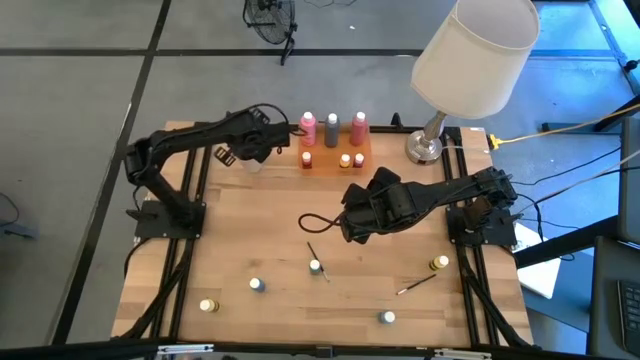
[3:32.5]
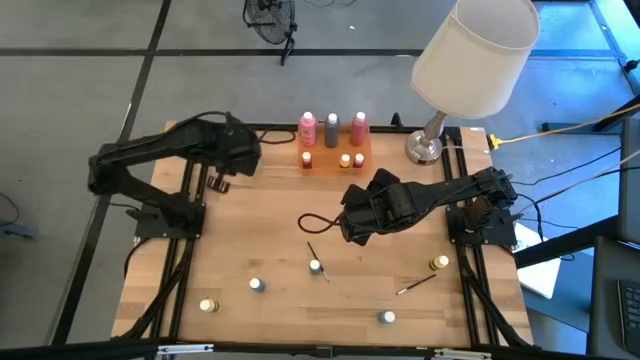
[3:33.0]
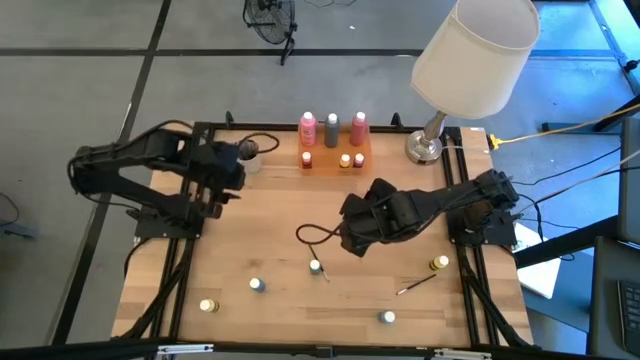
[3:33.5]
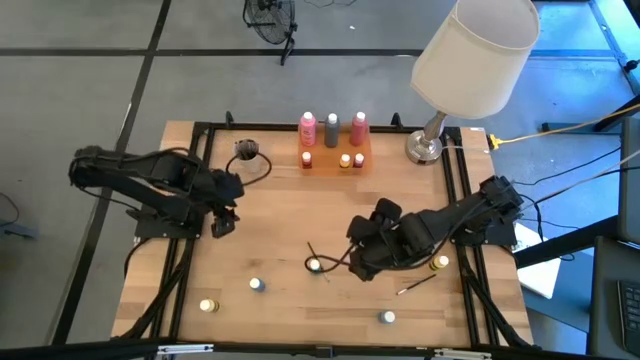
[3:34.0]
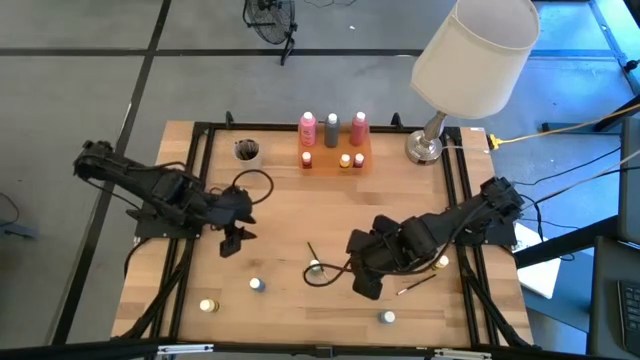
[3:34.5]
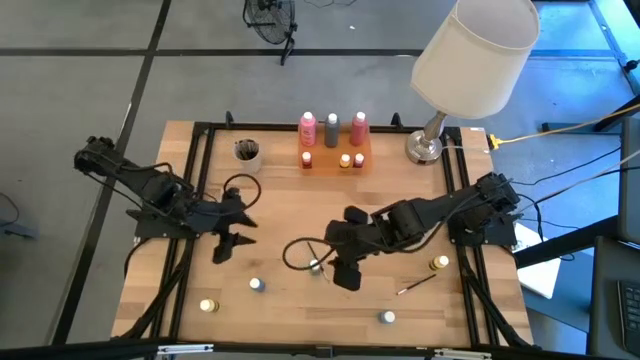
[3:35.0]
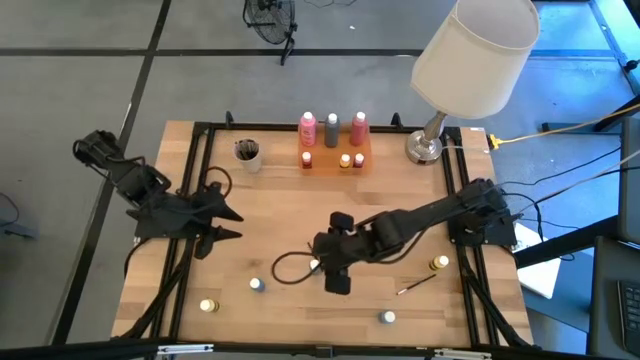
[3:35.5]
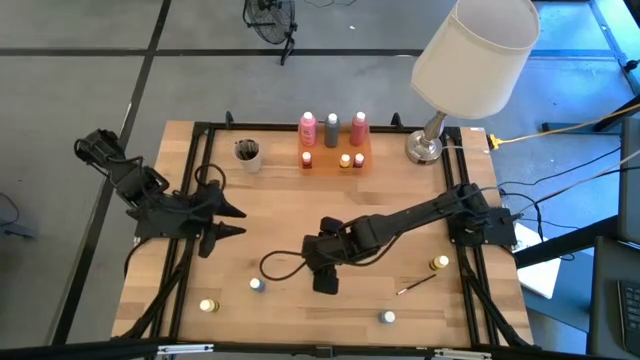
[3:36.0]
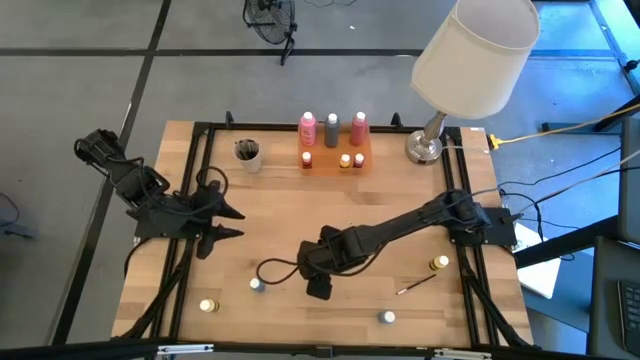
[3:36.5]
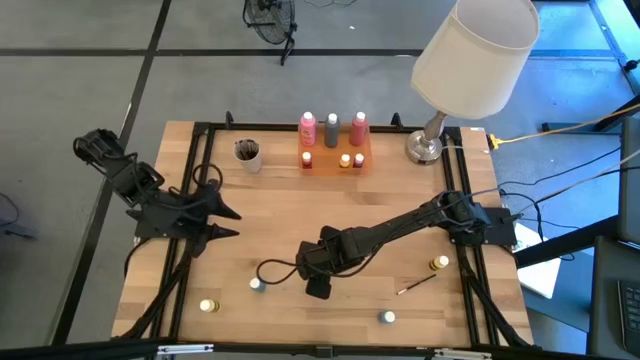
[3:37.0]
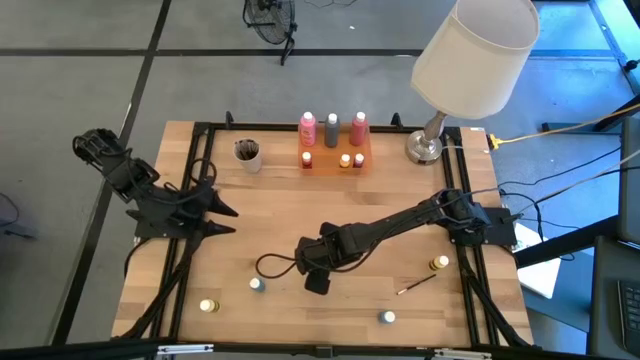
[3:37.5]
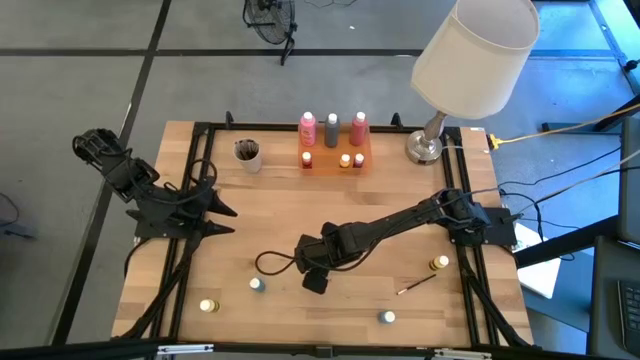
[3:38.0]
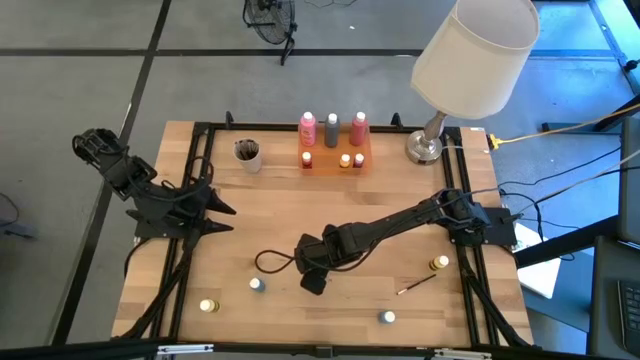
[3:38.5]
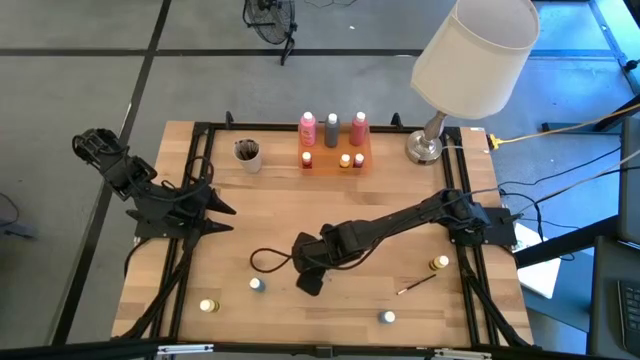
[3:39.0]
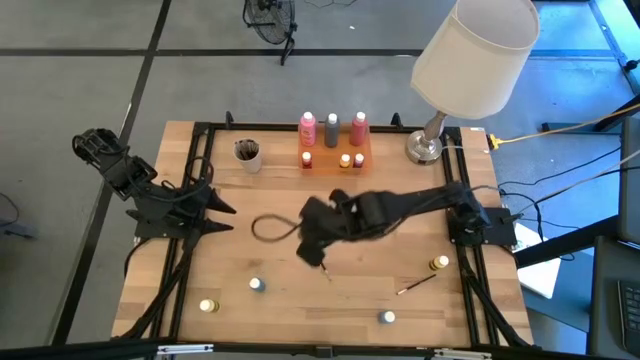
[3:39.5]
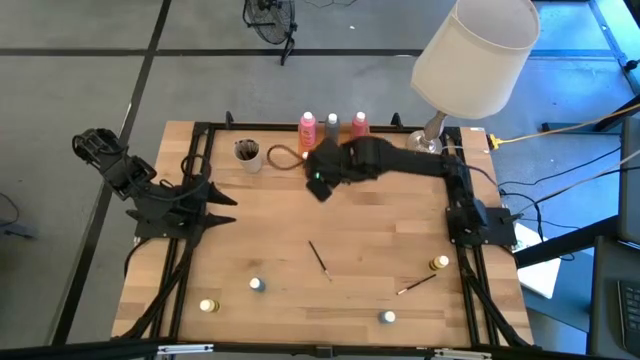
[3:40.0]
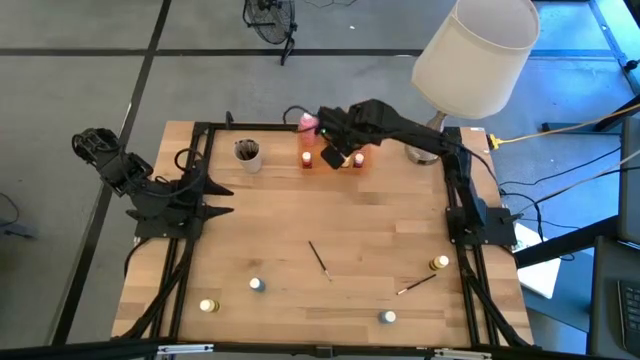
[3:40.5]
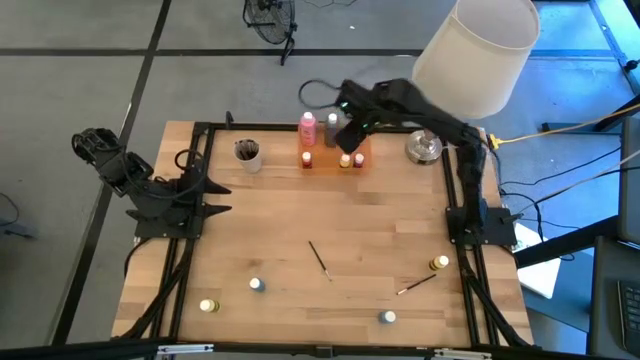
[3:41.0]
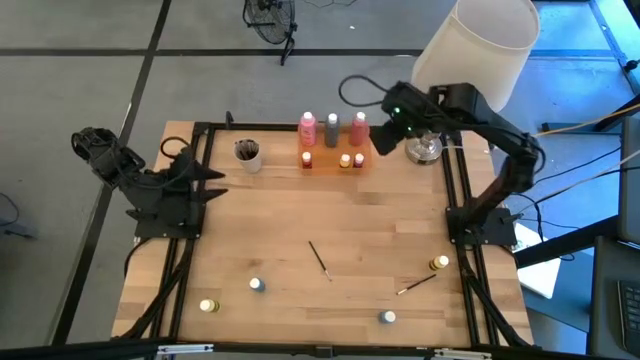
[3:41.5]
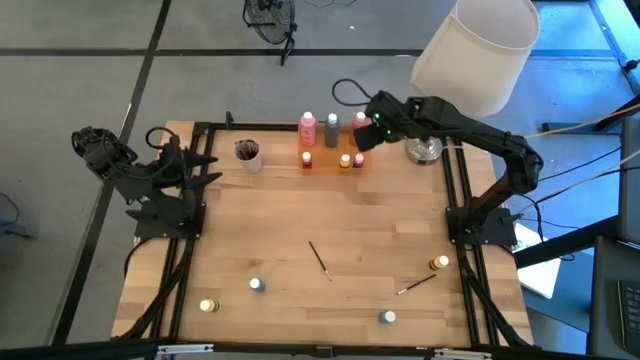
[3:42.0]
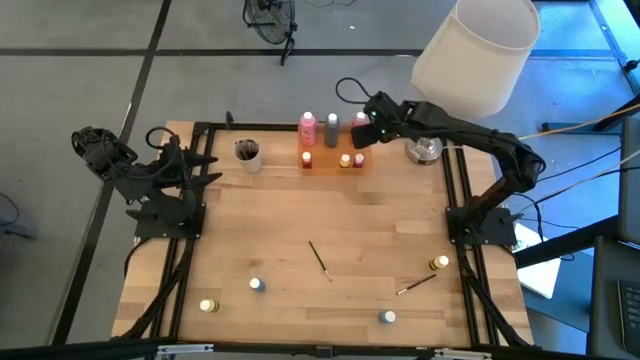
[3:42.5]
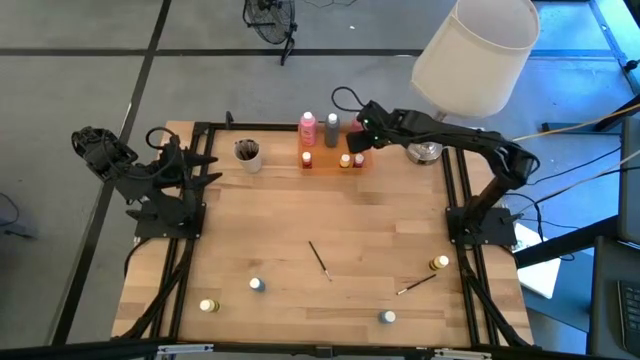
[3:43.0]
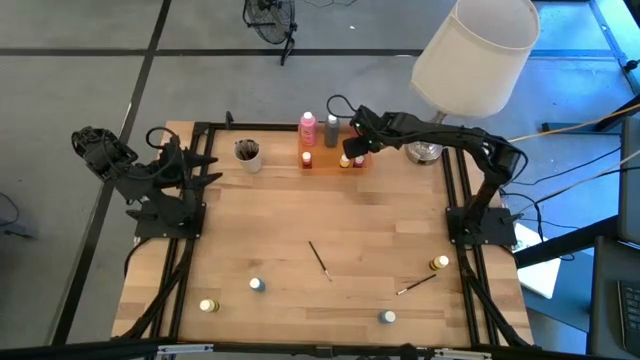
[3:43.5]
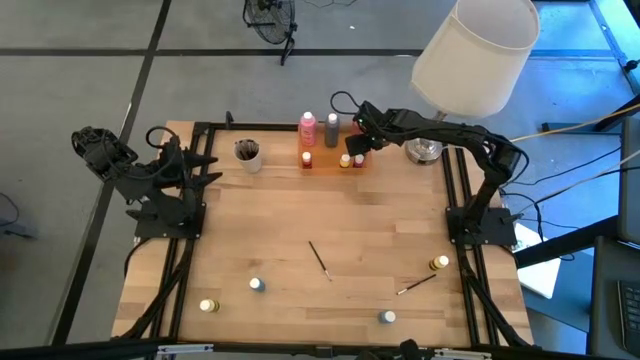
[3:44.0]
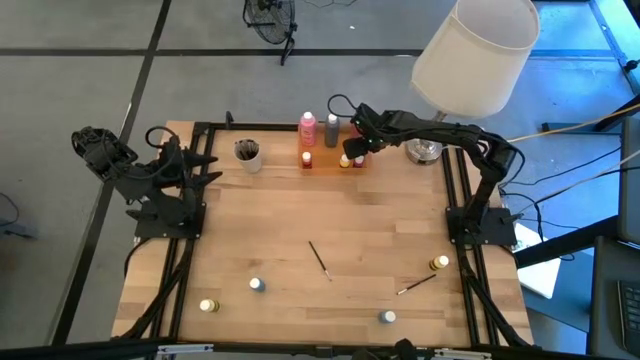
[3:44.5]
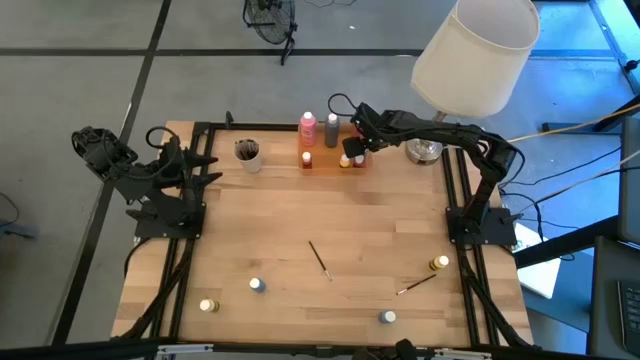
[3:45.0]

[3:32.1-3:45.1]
Task: Pick & Place Paint Supplies
Put the green paint bottle into the orange bin

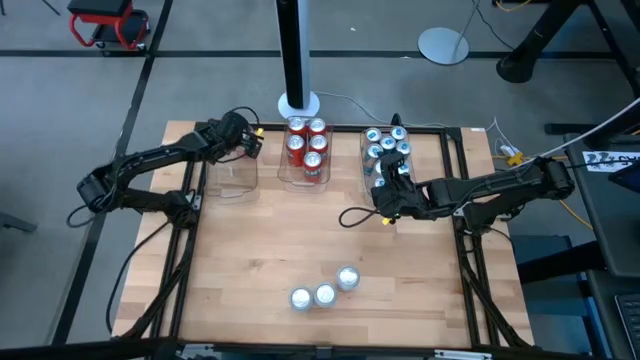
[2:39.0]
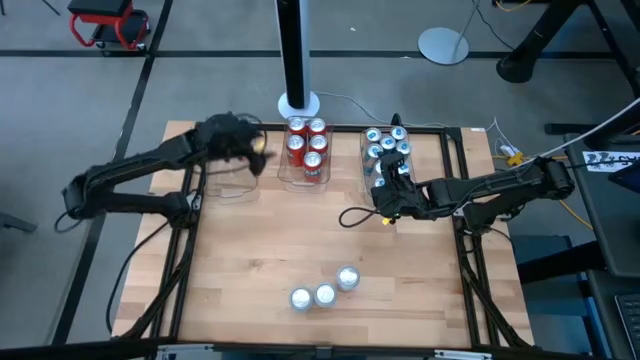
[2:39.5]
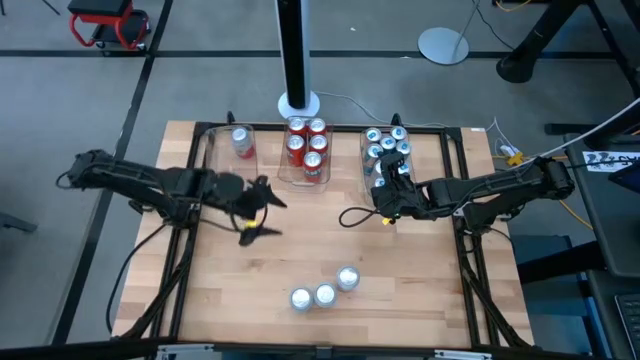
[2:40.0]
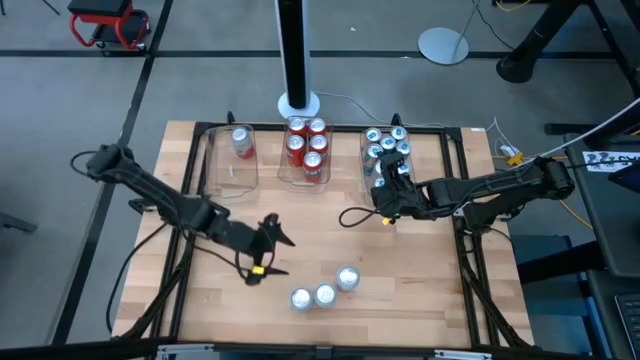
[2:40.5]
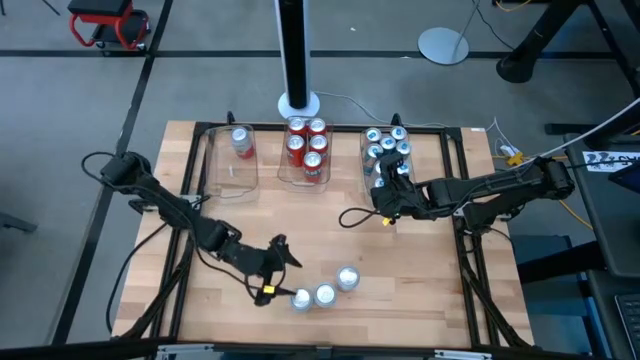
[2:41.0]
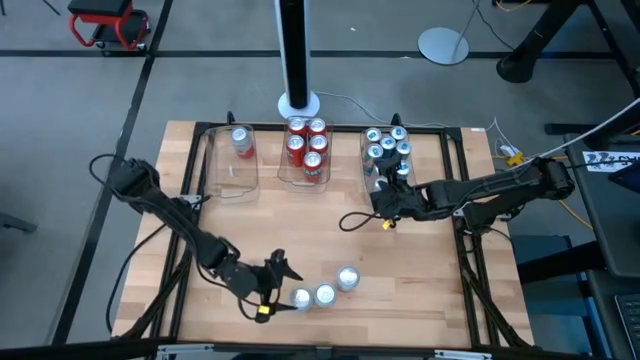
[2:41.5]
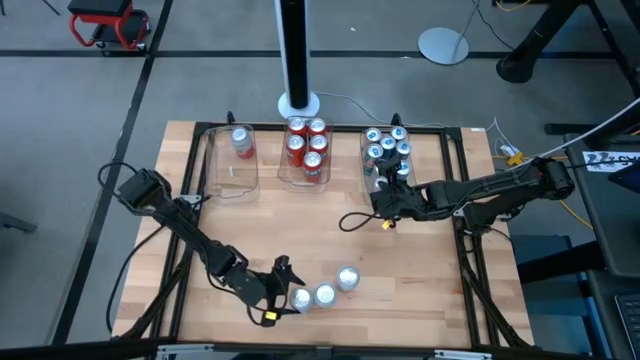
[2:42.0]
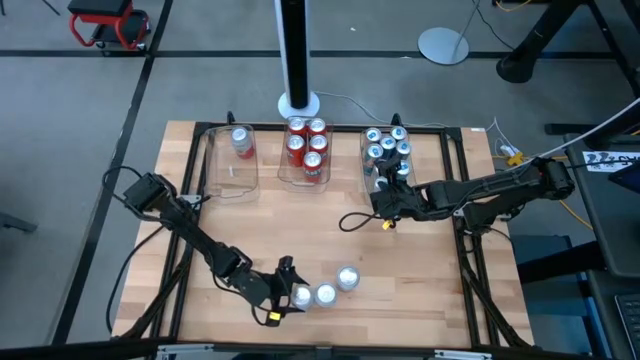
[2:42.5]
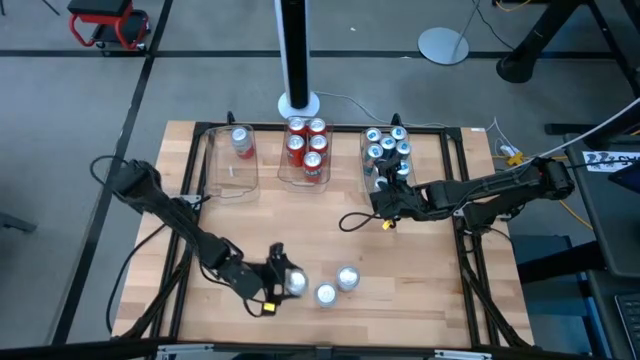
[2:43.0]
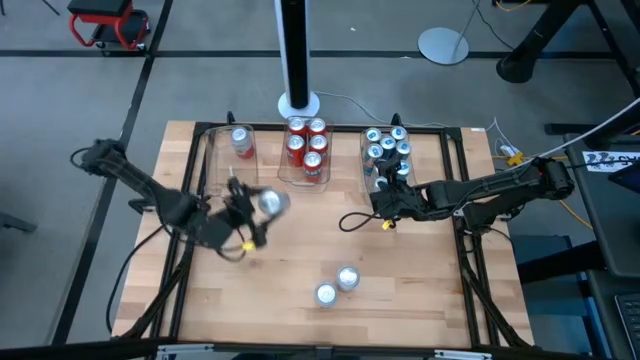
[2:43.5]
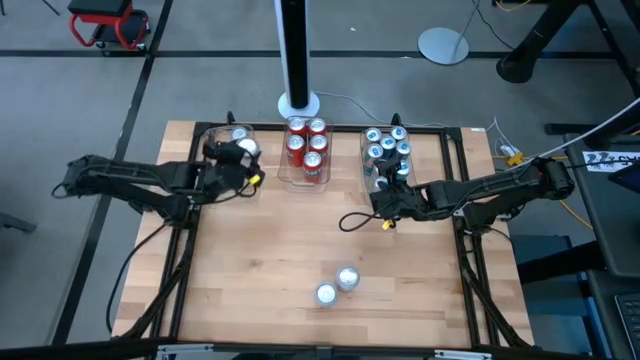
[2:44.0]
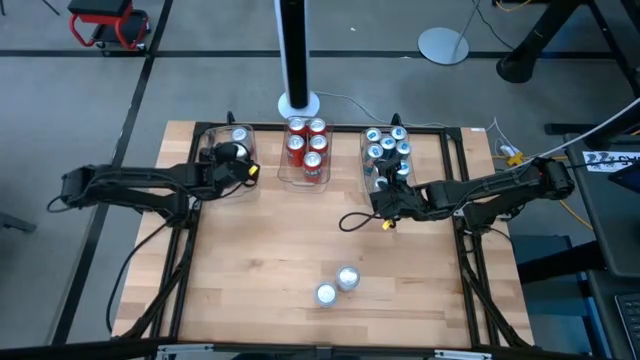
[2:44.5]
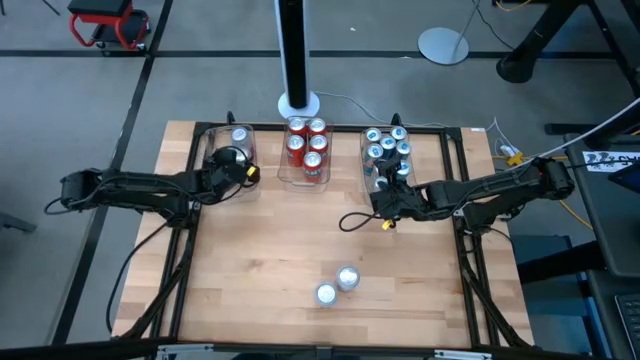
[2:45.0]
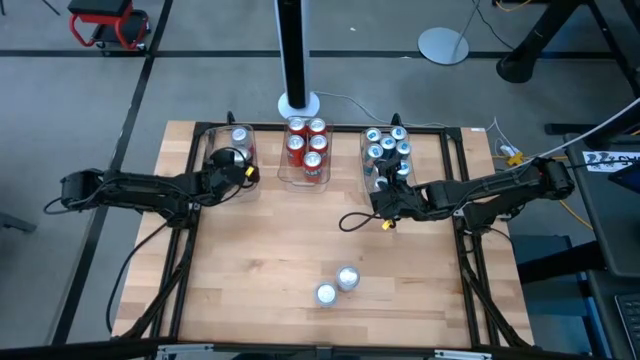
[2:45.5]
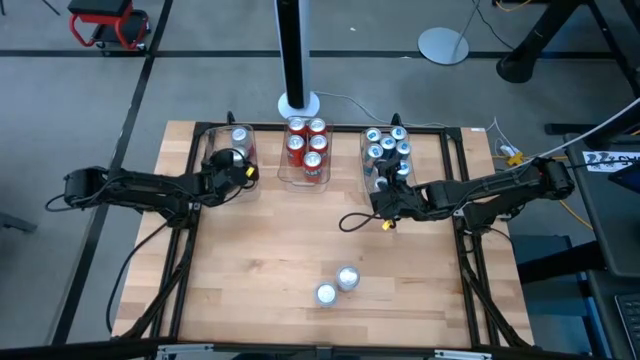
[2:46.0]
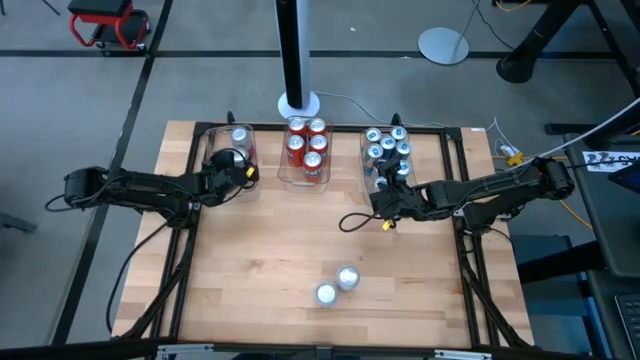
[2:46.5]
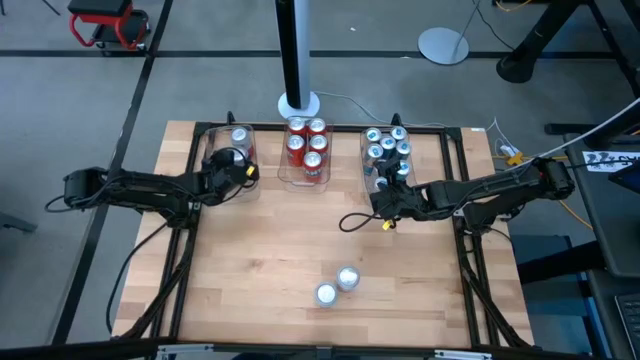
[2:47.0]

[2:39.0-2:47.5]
Task: Sort soda cans
Put the blue-white soda can into the top left transparent bin
